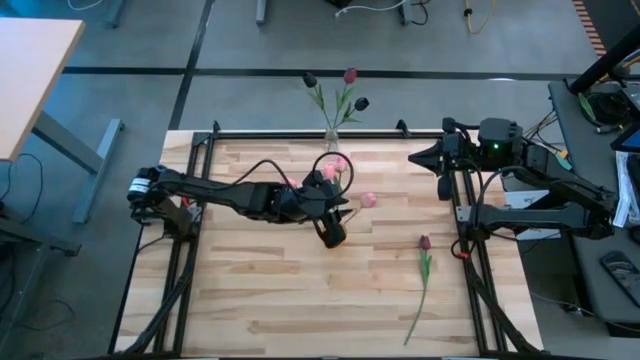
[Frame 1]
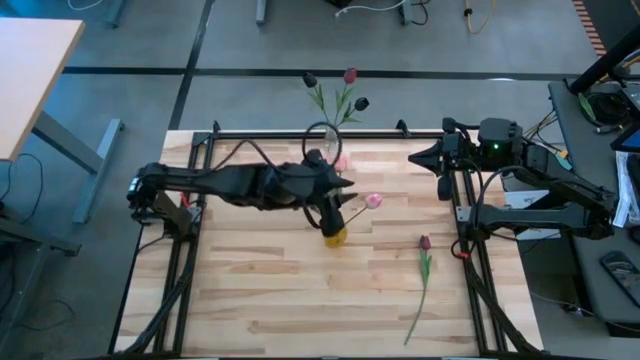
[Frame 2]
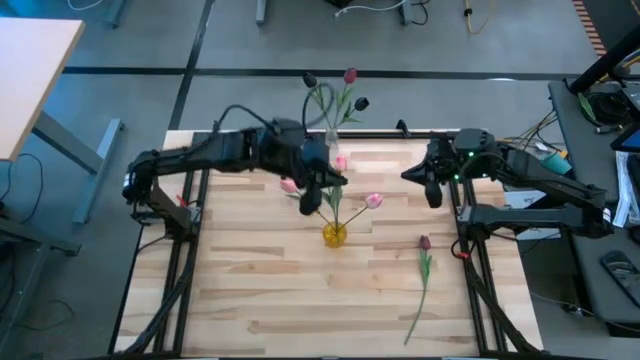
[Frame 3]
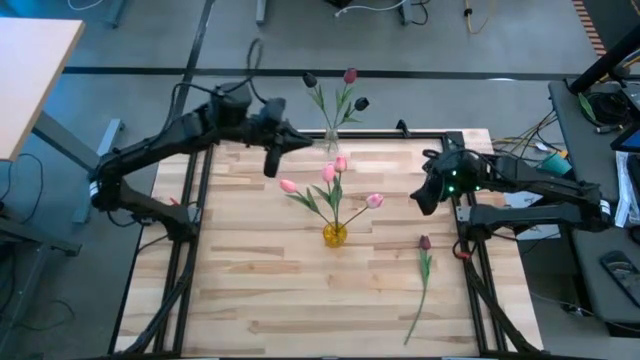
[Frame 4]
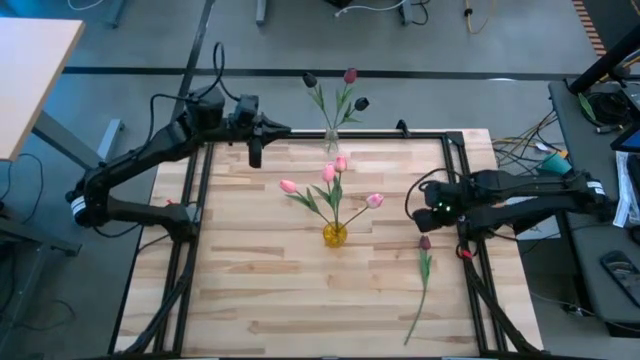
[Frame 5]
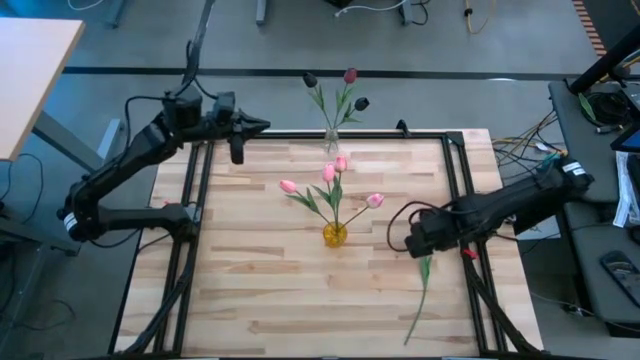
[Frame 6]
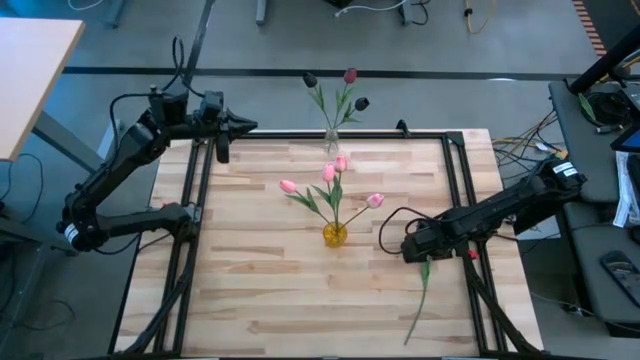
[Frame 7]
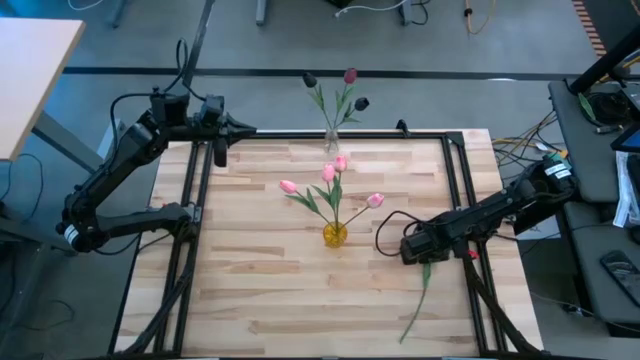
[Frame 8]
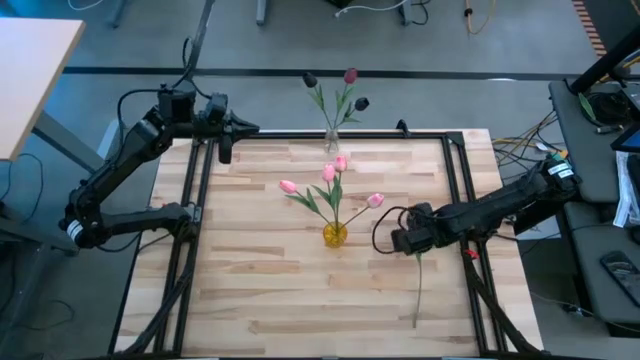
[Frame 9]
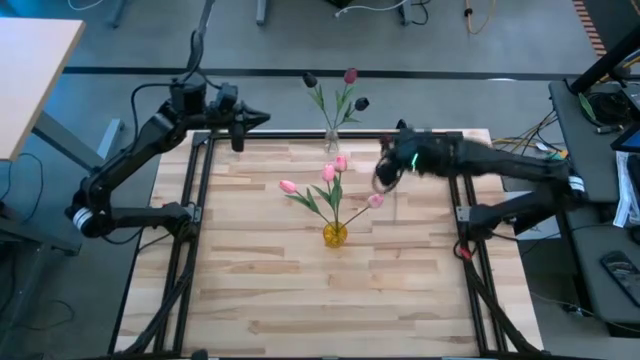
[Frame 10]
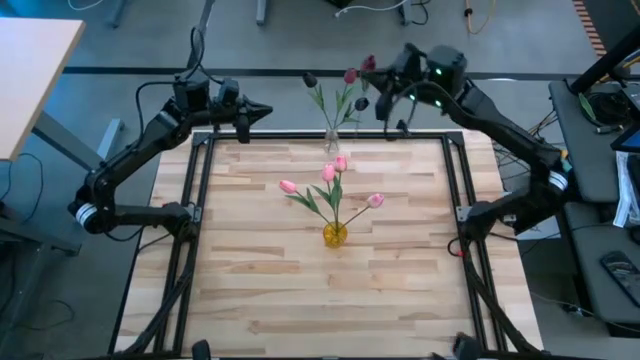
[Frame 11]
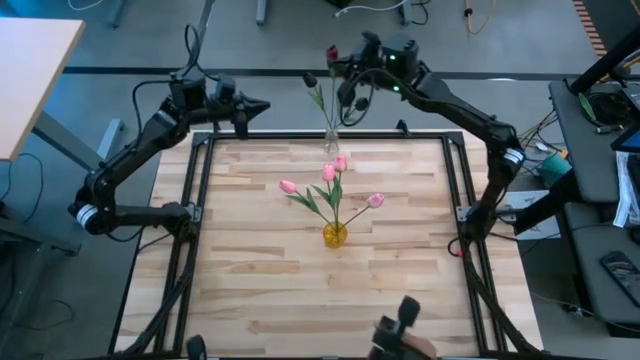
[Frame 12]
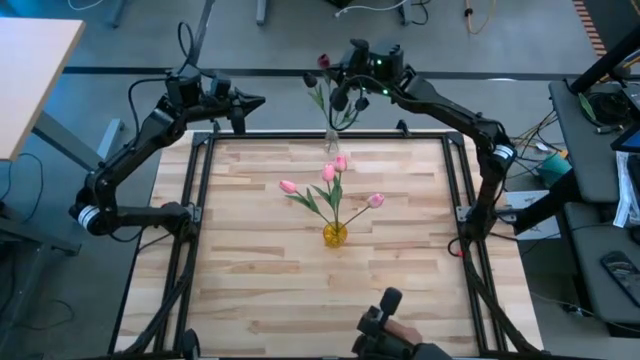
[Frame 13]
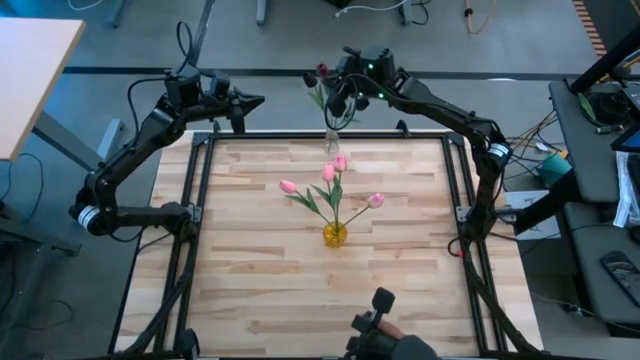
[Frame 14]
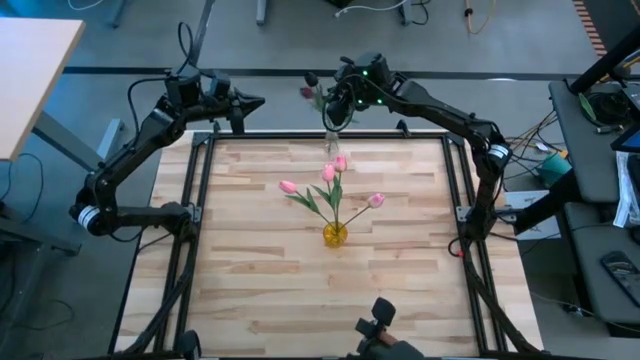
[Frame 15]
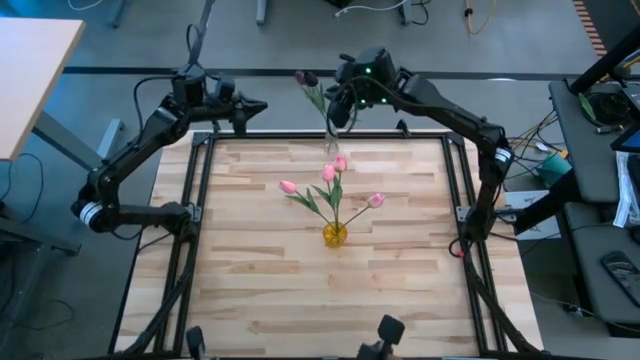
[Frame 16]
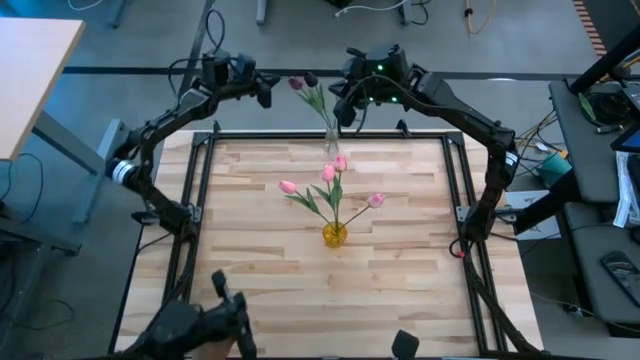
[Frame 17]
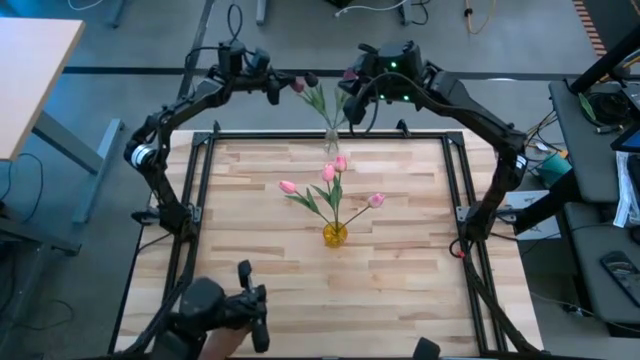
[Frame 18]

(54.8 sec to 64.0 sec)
Task: Sort flowers into vase by color
Put the red tulip into the transparent vase

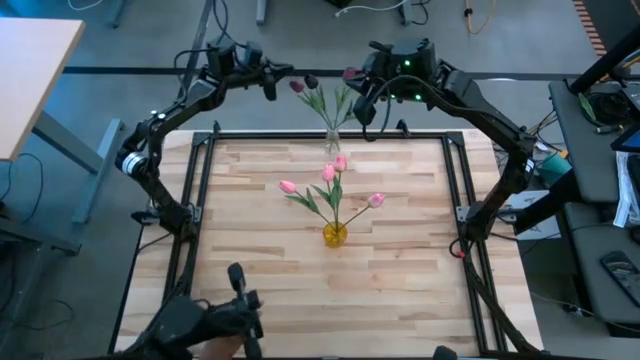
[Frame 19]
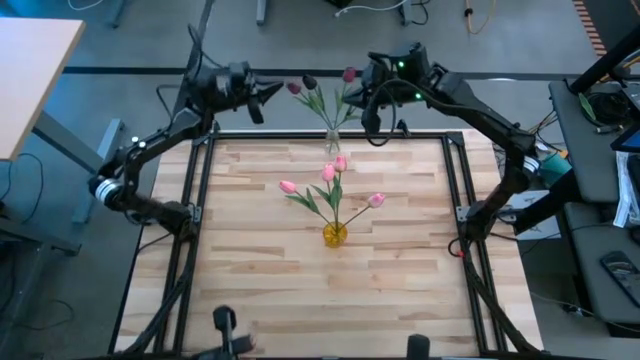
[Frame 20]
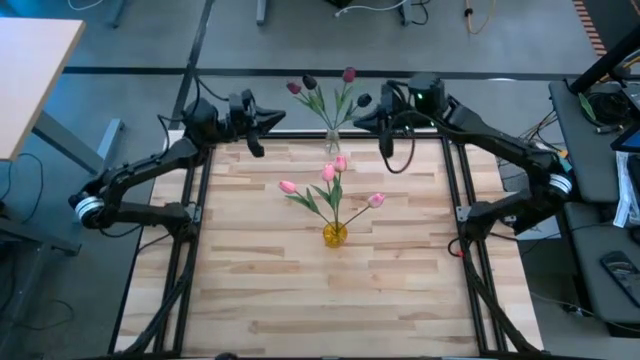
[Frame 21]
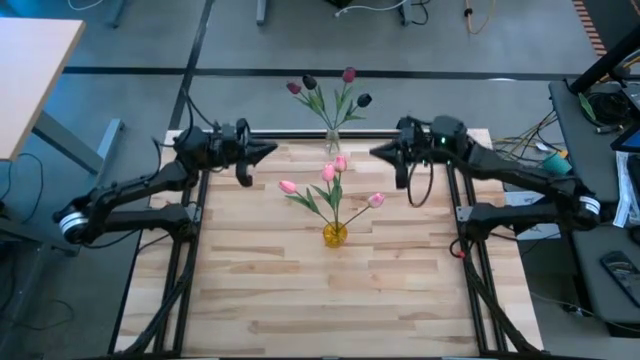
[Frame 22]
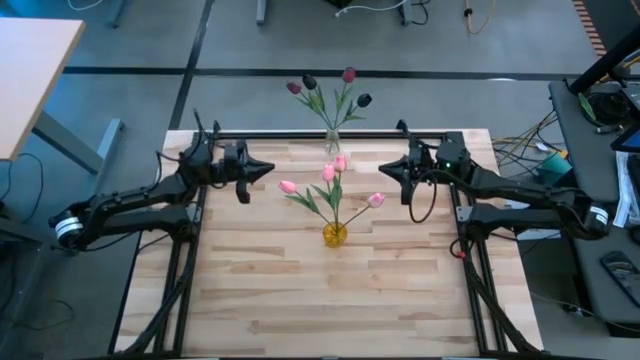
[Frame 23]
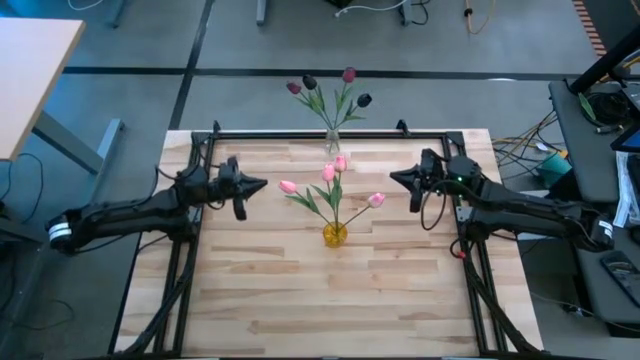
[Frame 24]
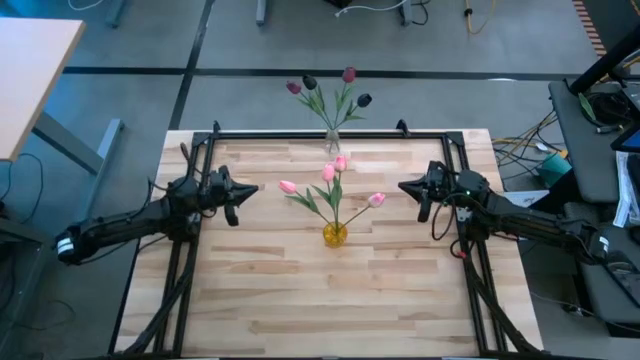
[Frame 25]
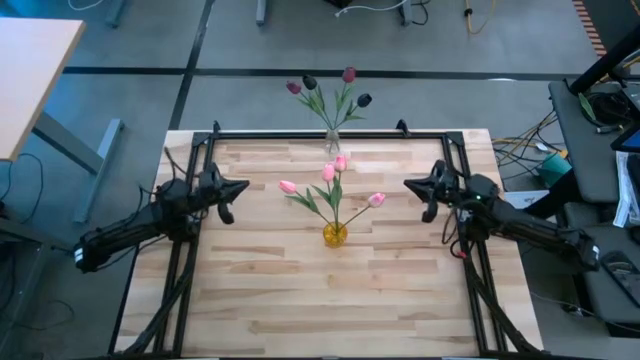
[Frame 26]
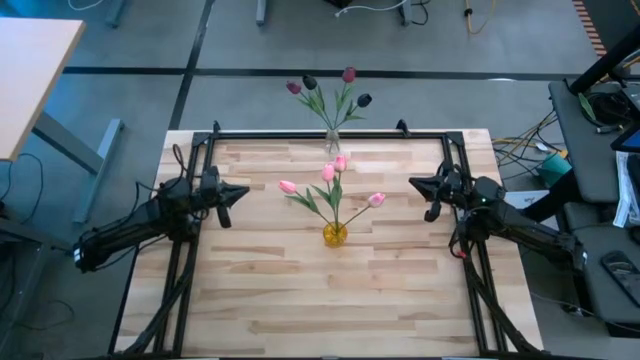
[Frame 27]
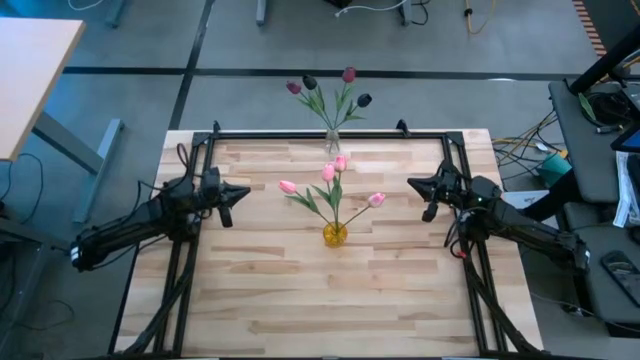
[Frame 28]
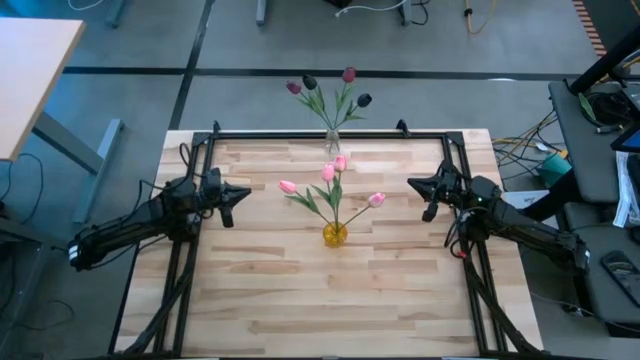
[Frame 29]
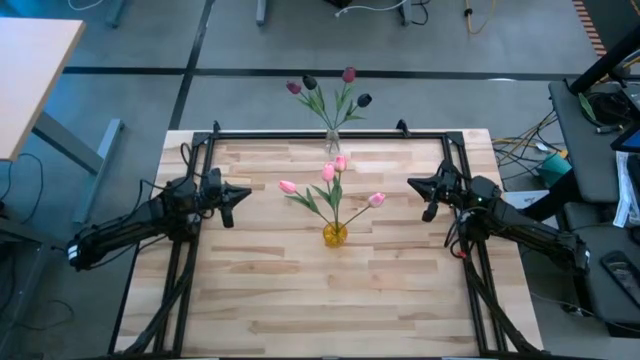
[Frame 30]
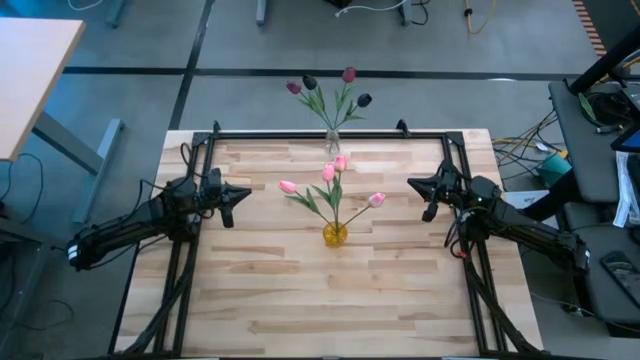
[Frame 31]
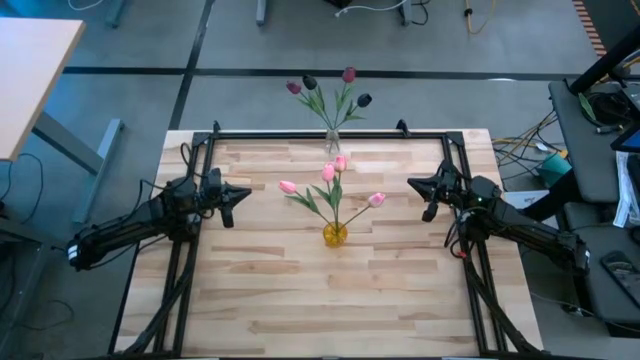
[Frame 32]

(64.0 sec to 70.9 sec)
Return to Home Position

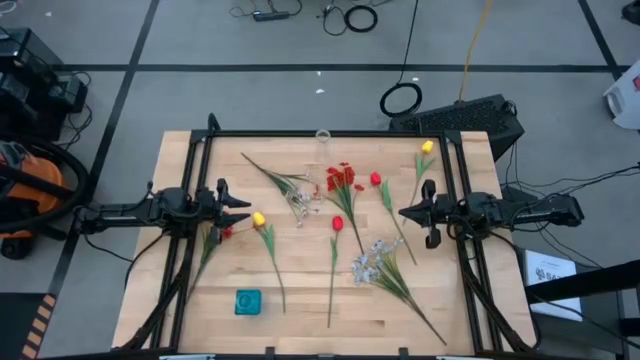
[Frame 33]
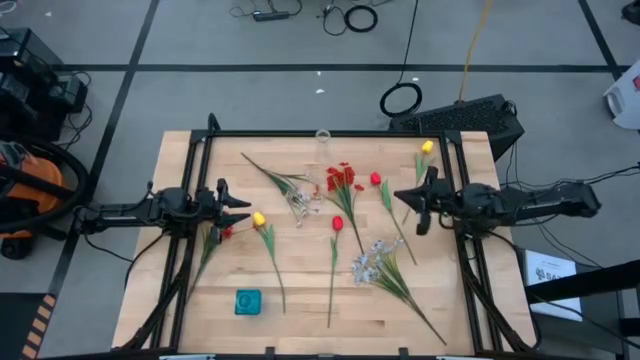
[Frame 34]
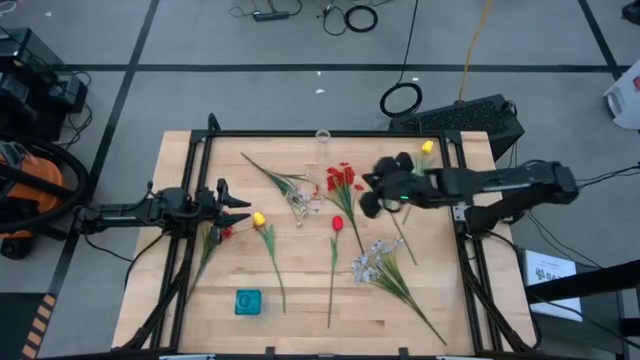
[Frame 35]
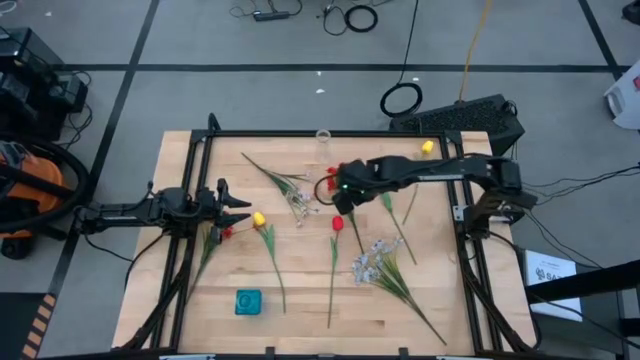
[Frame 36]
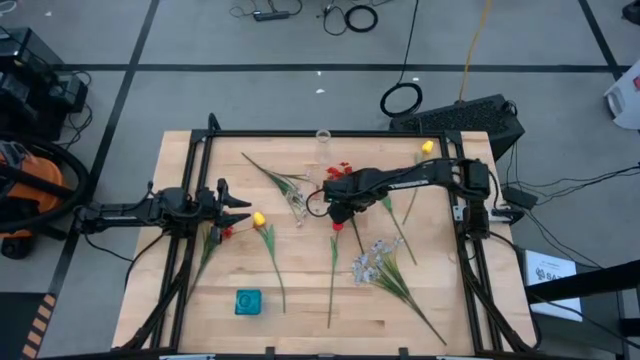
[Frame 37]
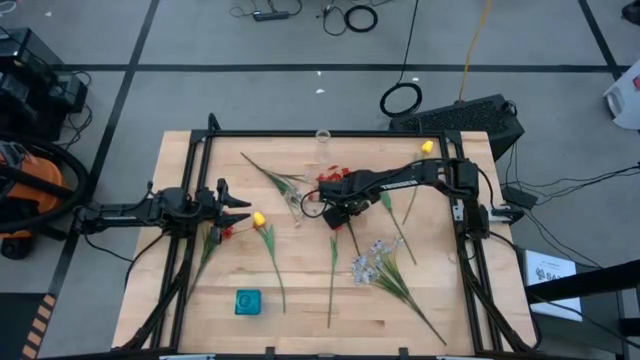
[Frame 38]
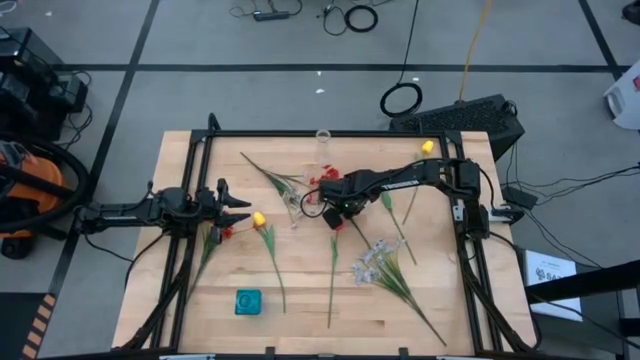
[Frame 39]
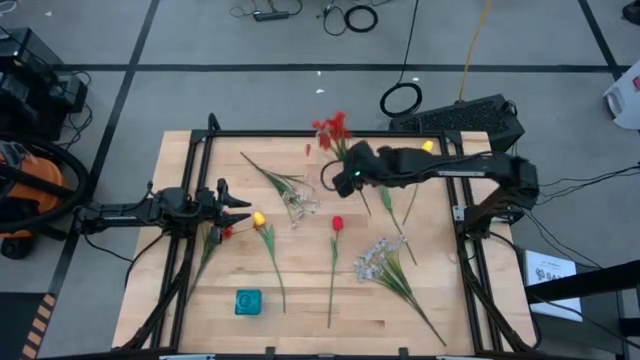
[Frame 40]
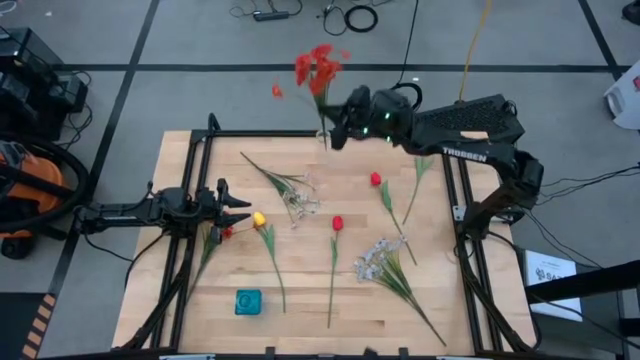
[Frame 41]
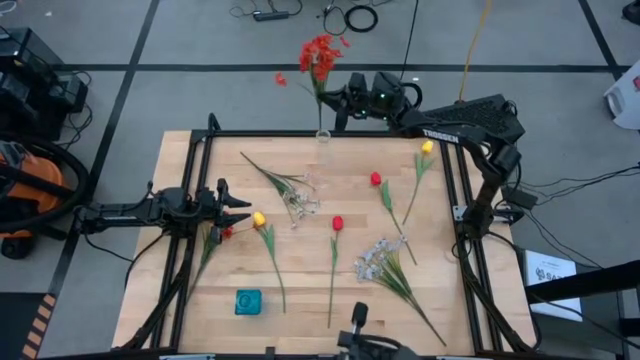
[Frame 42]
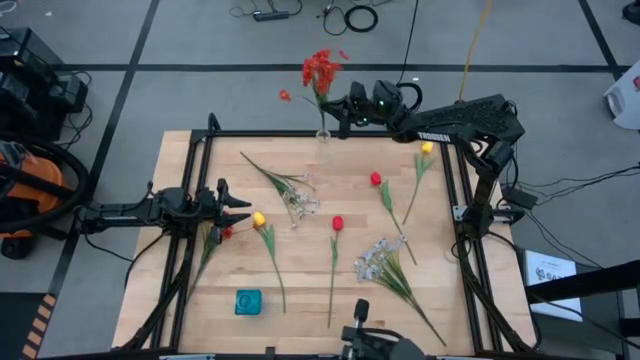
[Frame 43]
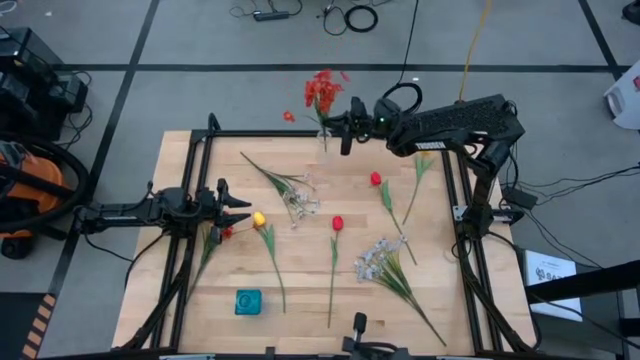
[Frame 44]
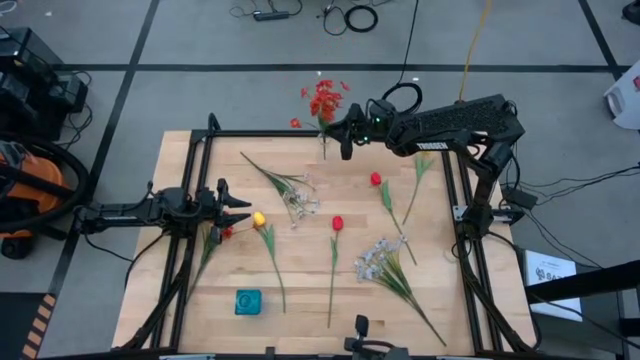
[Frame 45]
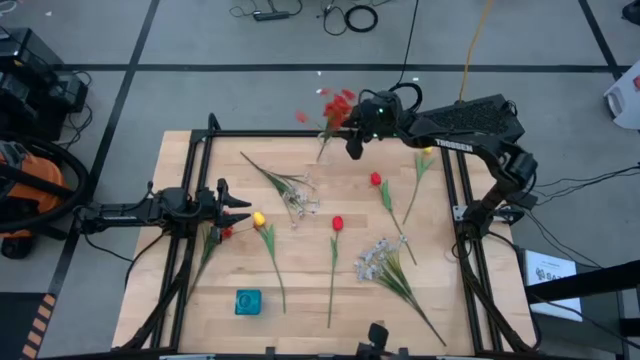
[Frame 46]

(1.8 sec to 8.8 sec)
Task: Sort flowers into vase by color
Put the right red flowers into the transparent vase
